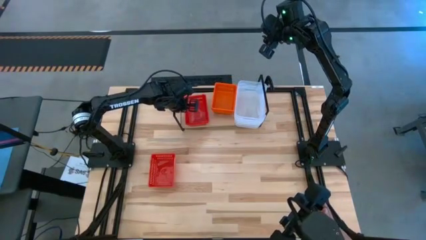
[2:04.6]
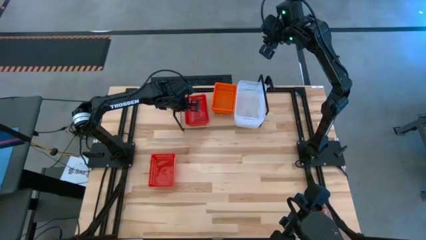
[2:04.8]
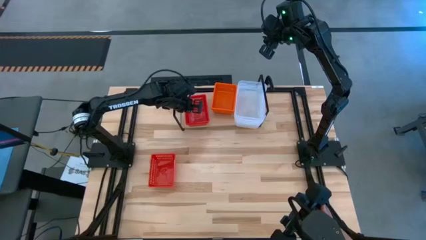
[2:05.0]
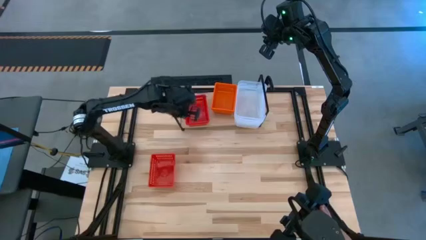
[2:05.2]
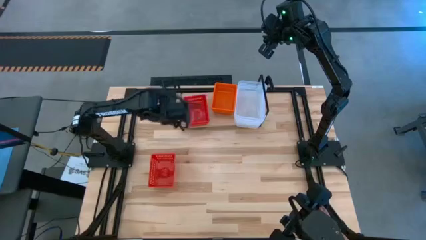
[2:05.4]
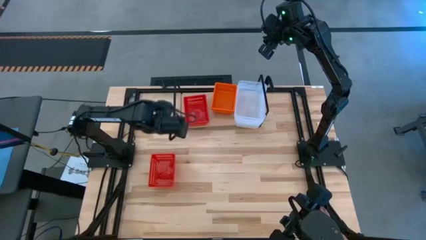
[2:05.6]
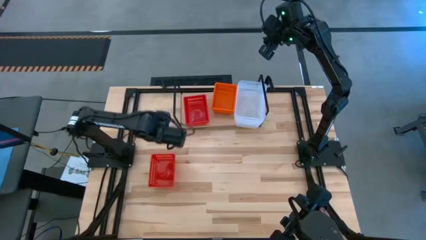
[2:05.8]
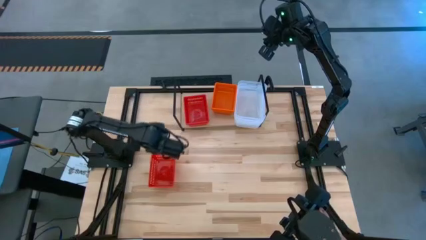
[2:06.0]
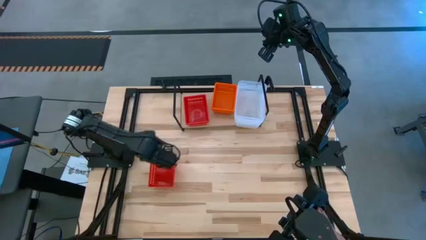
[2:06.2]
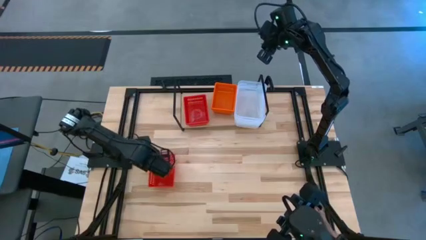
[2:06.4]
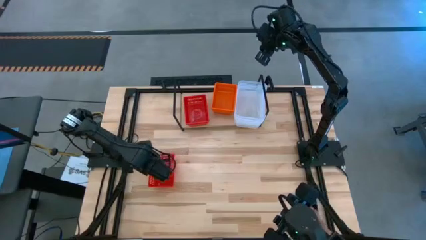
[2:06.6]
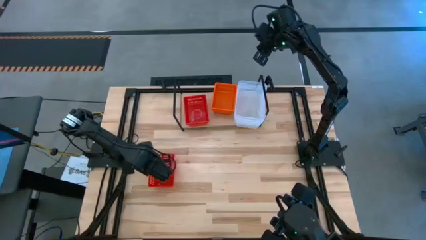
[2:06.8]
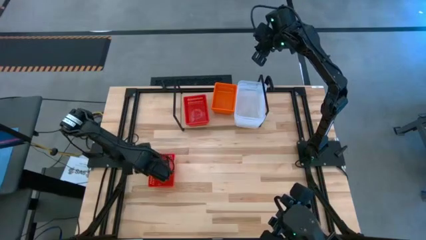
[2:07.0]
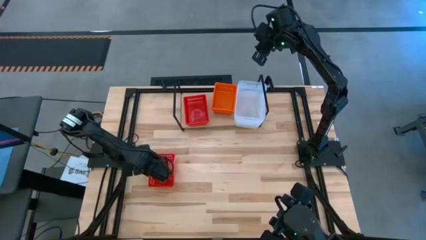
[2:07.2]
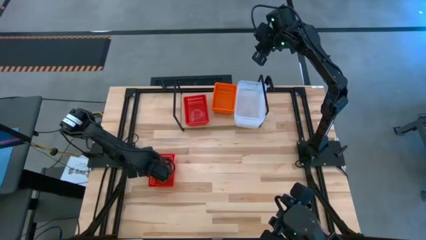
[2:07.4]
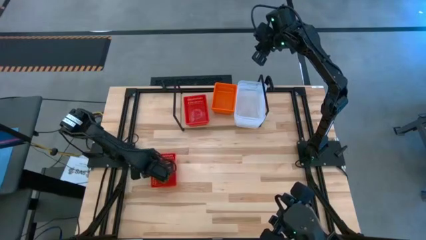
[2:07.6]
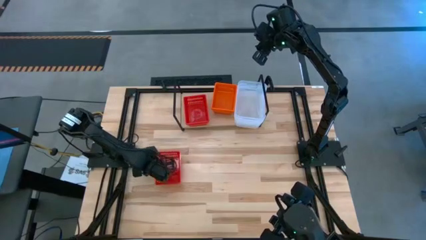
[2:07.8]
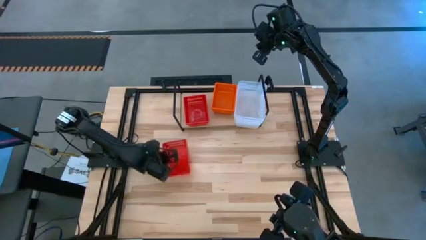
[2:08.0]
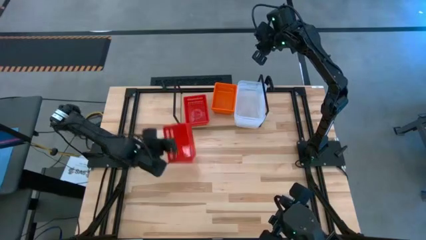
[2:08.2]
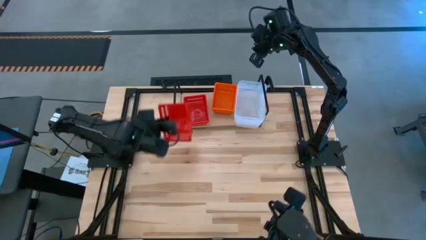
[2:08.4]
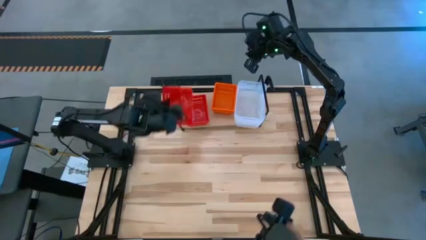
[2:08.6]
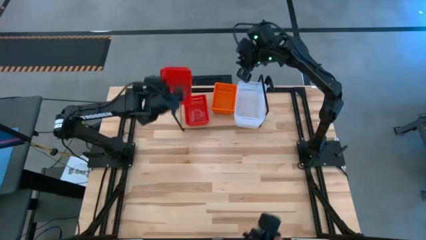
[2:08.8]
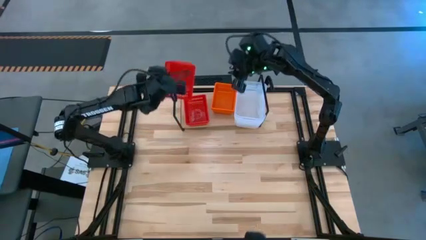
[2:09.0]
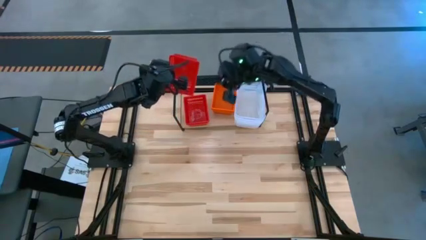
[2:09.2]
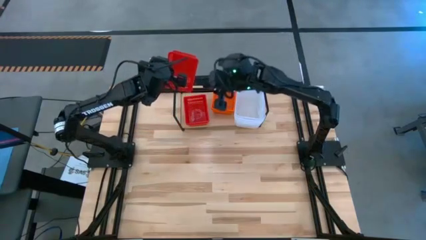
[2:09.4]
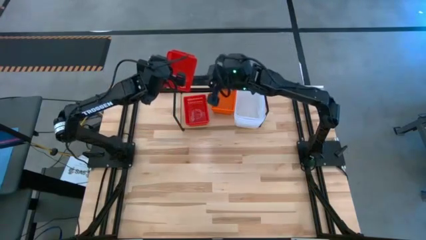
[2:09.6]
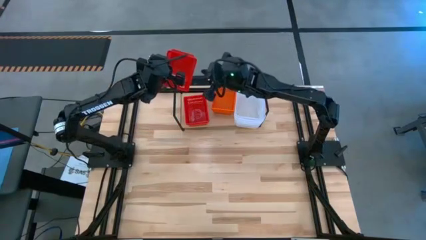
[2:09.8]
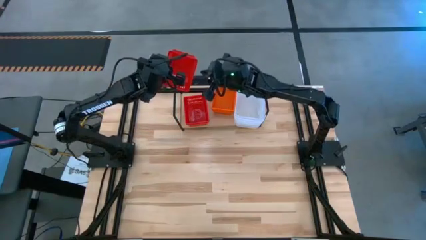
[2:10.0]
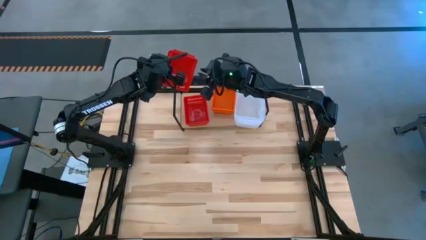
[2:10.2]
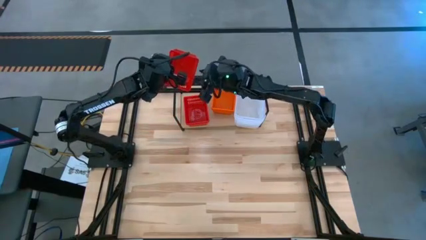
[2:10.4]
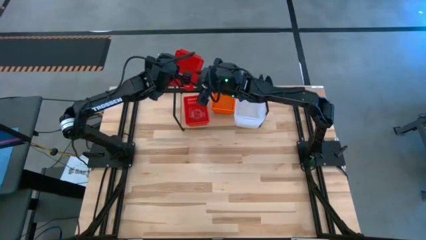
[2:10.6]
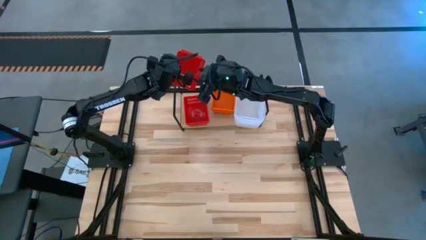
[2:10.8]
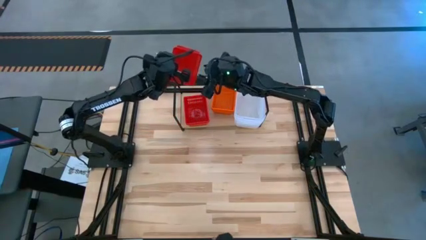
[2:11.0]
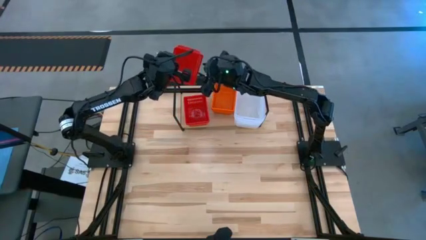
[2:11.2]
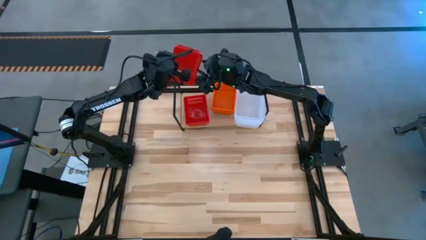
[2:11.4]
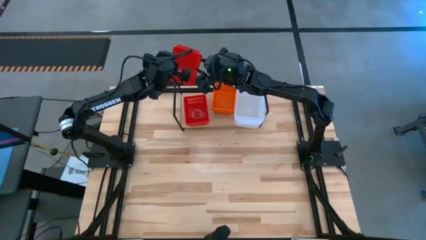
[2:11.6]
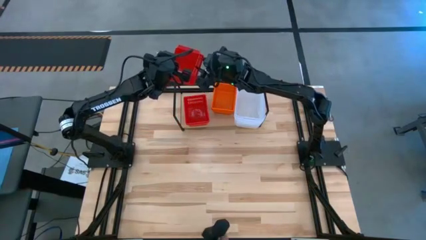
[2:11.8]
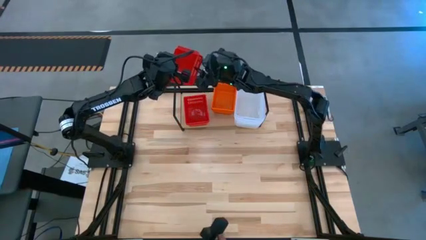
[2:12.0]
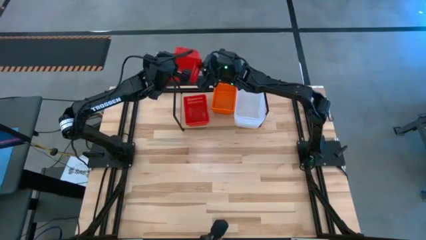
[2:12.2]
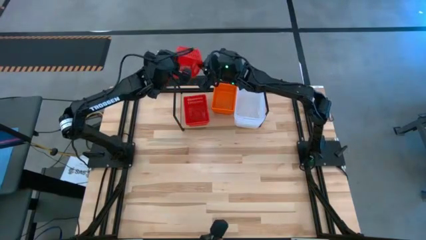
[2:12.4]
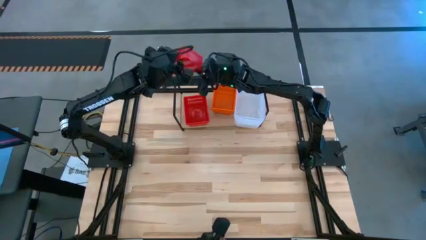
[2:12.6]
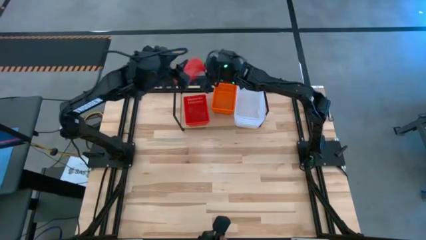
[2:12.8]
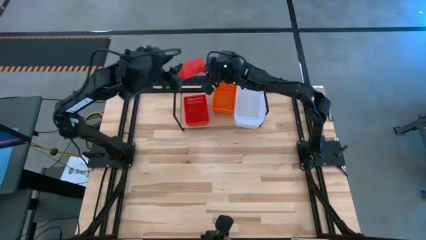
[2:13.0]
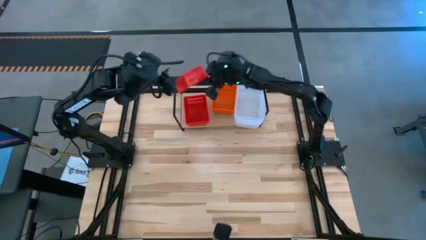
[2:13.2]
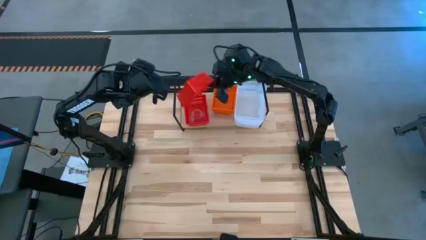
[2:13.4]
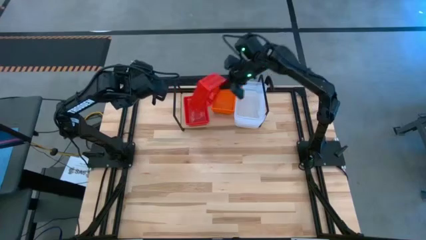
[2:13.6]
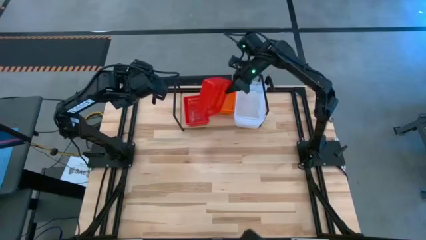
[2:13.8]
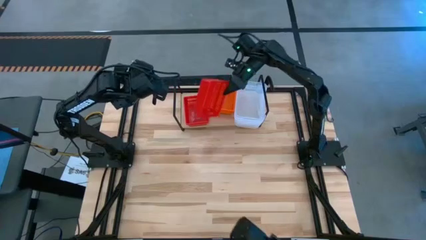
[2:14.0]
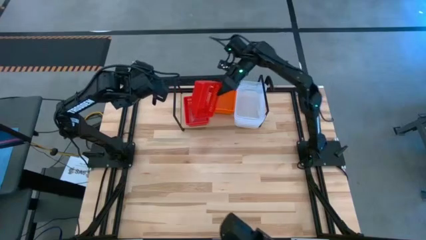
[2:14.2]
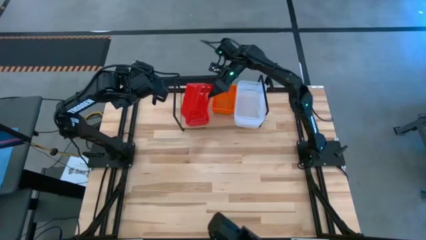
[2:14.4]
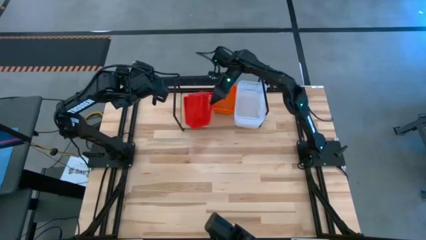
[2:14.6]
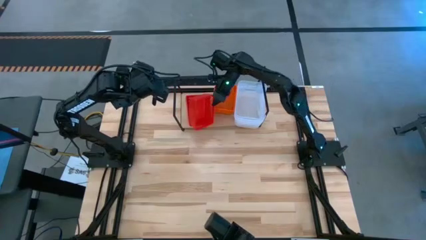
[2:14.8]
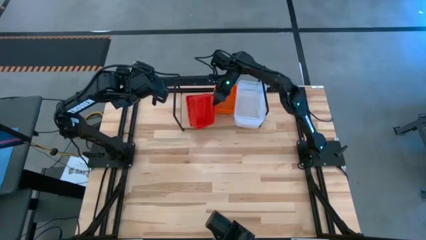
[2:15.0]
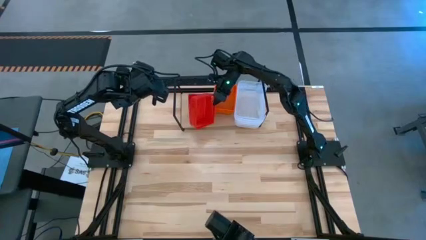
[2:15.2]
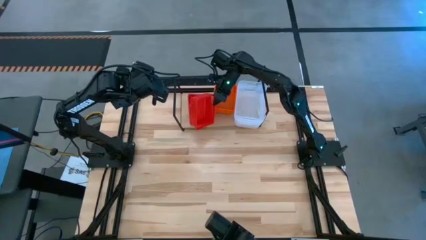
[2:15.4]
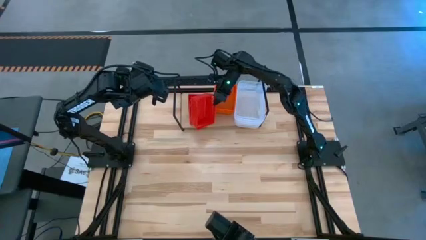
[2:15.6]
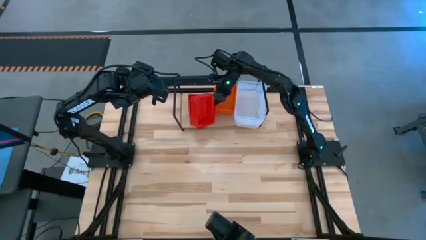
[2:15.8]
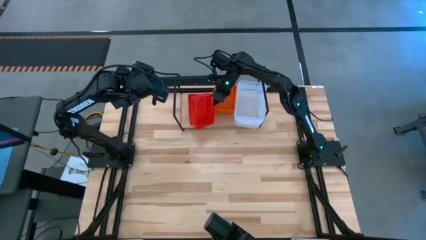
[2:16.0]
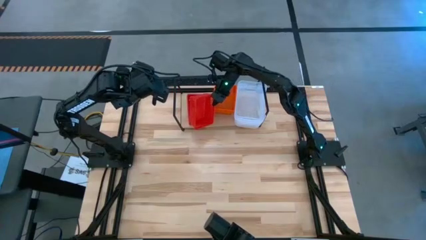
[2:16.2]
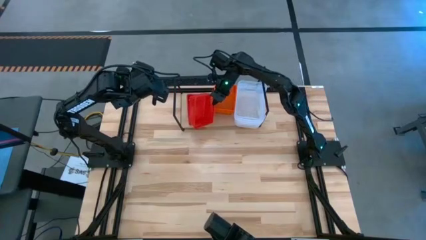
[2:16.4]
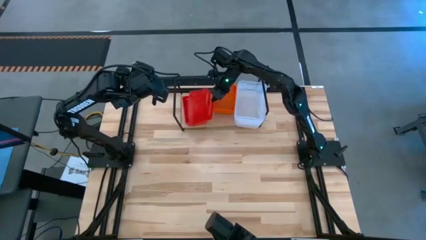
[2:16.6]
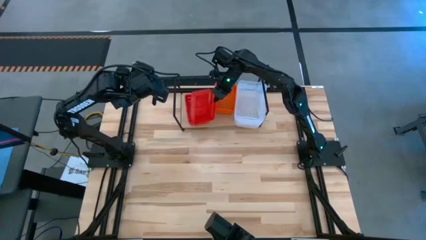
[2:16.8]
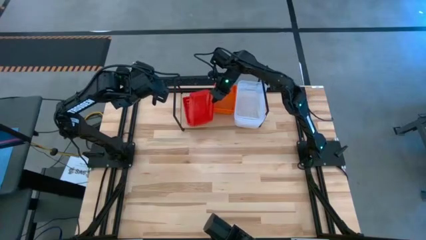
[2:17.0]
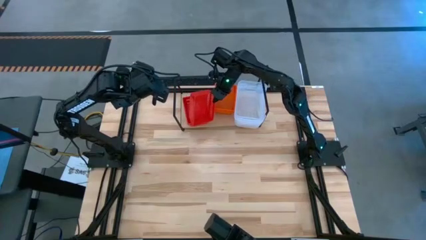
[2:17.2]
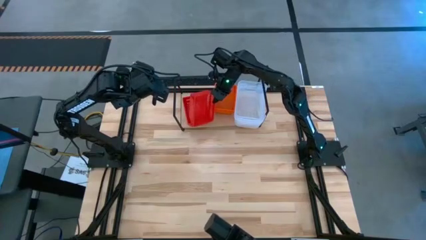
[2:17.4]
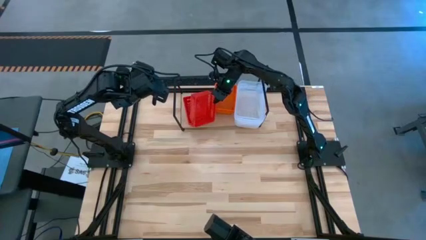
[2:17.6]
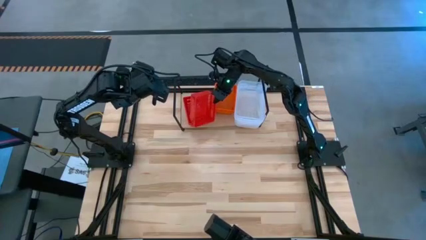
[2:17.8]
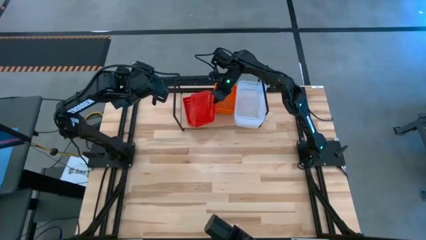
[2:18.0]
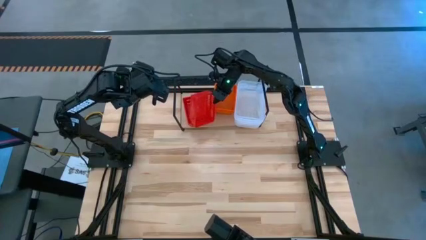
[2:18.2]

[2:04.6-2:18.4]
Task: Stack baskets on shelf by color
Stack the red bin on top of the red bins on the shelf

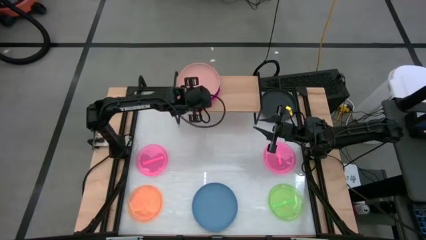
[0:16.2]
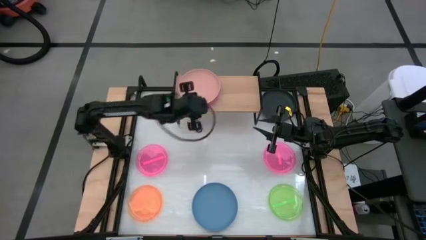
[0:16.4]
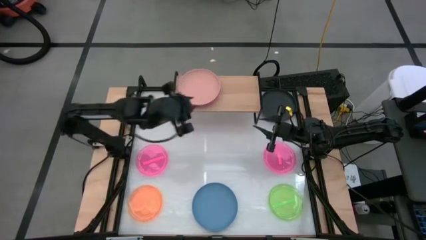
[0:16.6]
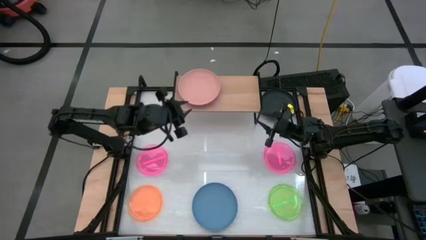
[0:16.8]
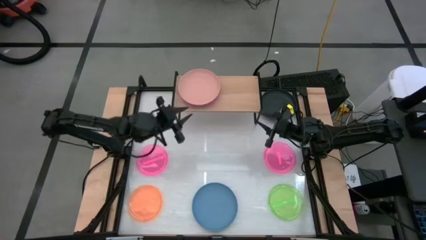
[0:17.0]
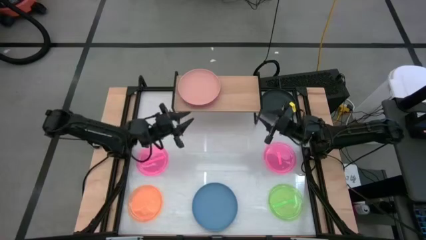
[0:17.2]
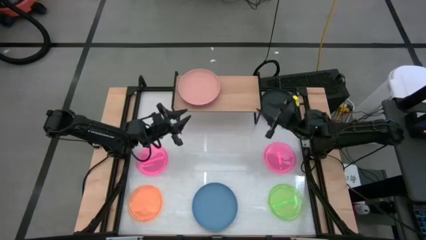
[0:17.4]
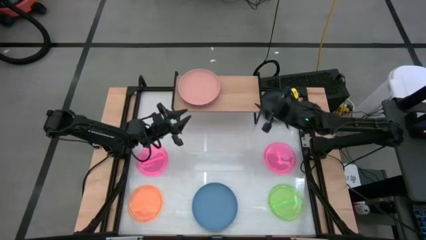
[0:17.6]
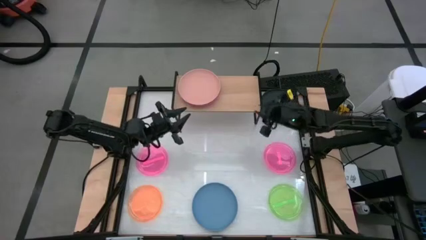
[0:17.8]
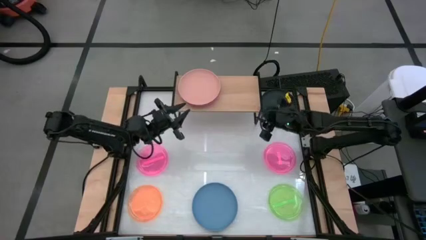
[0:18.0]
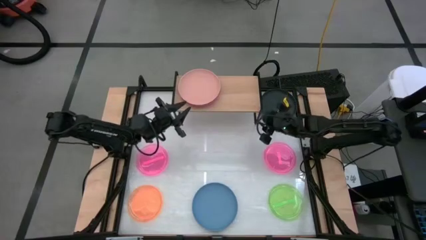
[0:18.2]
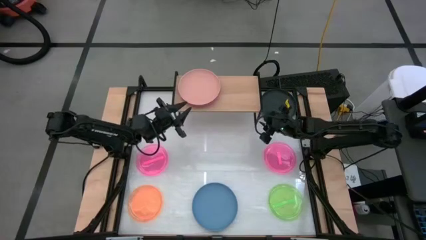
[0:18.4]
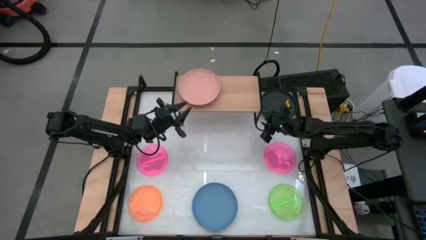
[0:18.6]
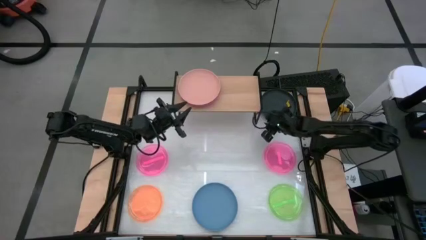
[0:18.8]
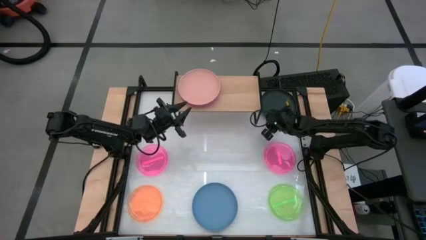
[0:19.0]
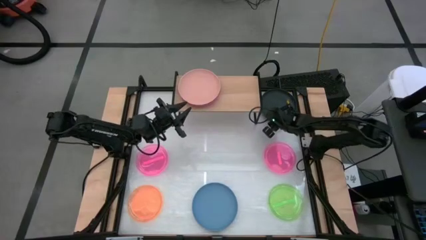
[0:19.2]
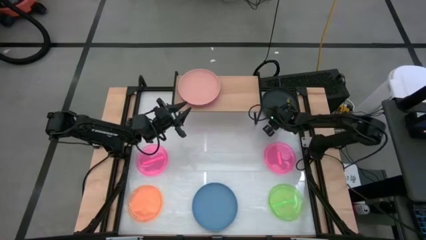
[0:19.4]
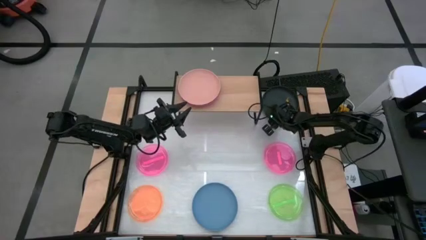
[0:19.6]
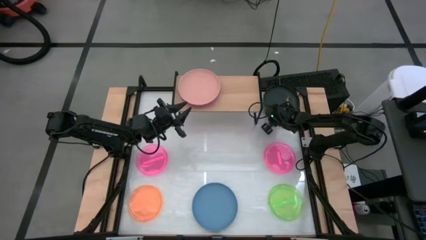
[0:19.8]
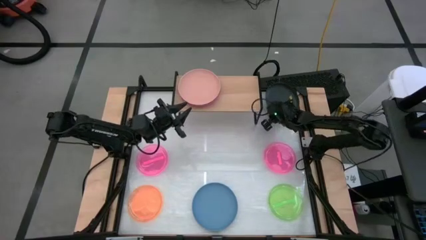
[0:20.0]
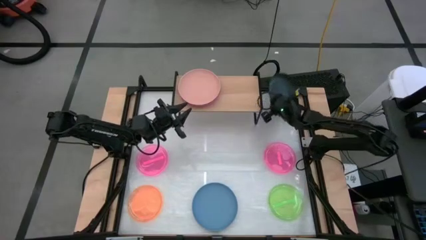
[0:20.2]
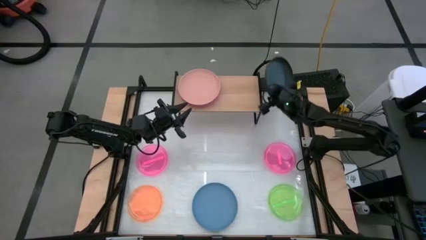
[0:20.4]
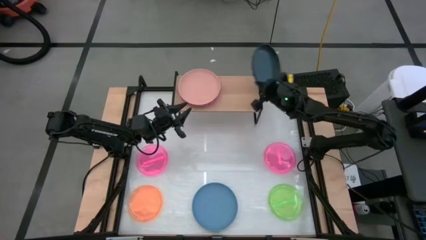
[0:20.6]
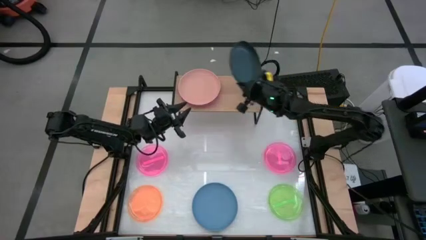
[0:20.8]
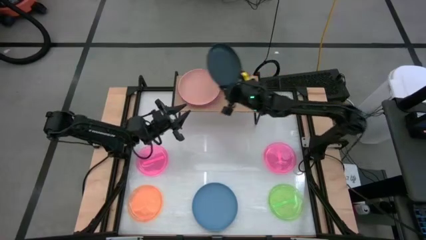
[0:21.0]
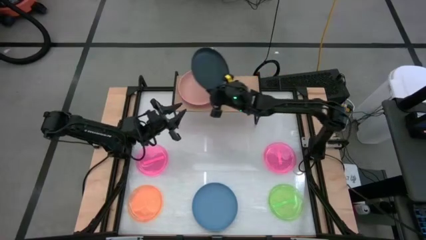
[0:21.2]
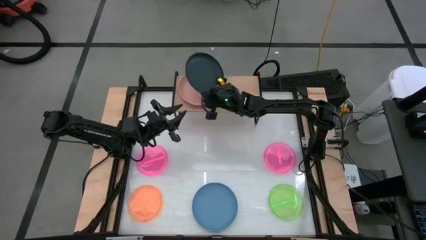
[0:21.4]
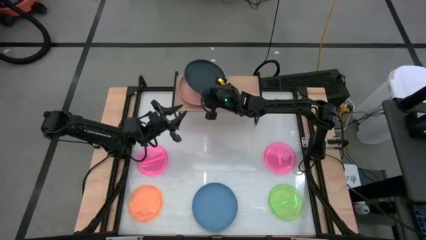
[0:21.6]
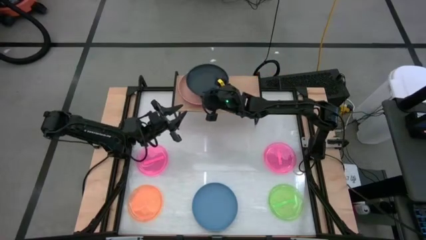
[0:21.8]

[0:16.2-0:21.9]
Task: Place and stack plates onto a shelf
Stack the black plate on the brown plate on the shelf
